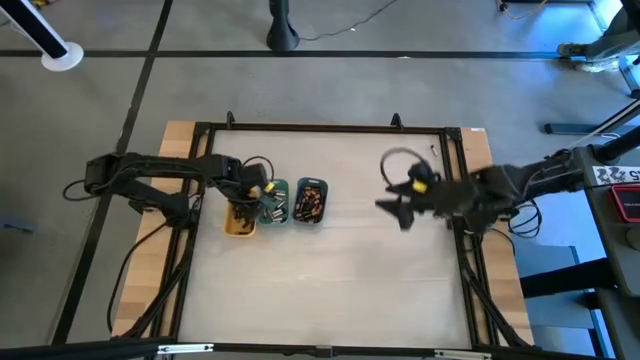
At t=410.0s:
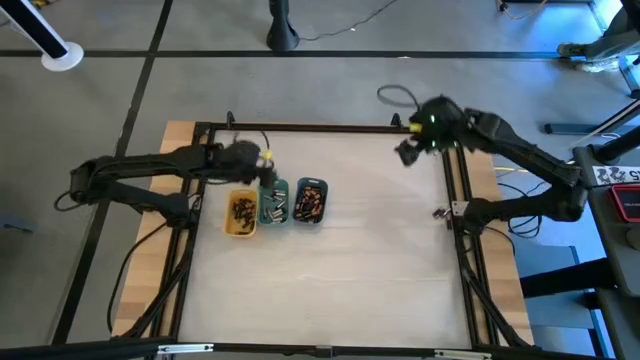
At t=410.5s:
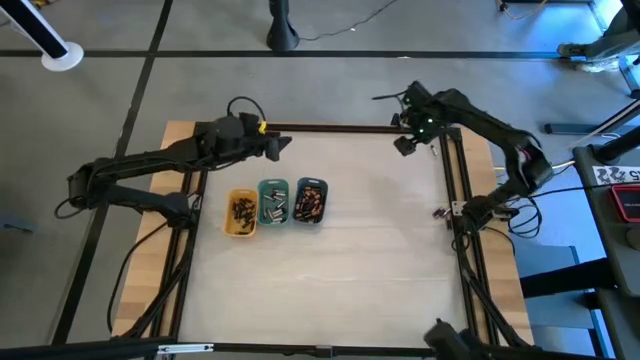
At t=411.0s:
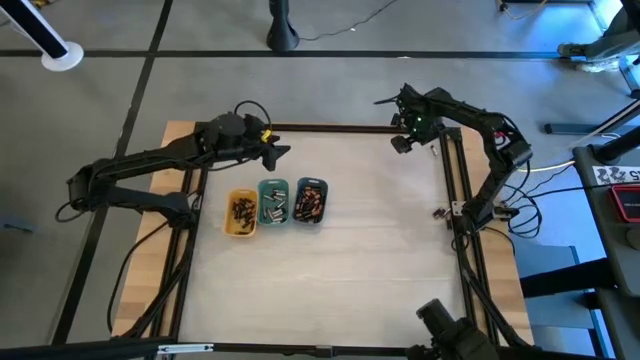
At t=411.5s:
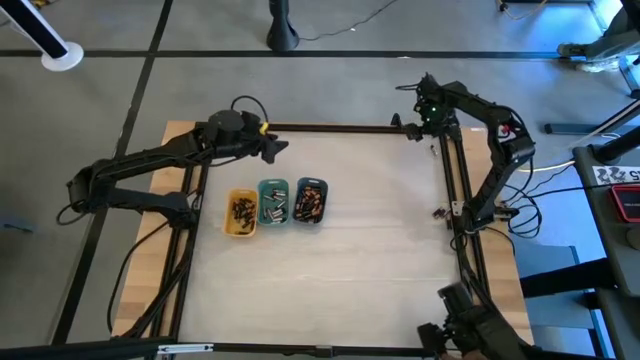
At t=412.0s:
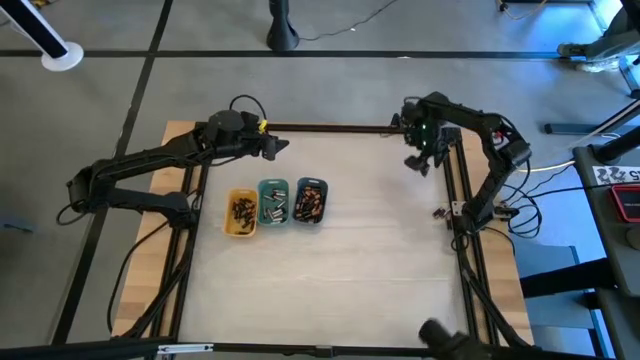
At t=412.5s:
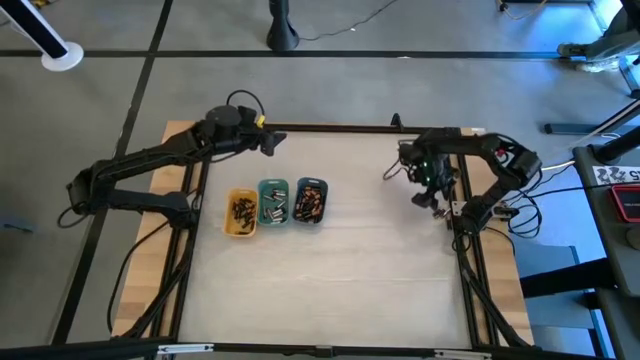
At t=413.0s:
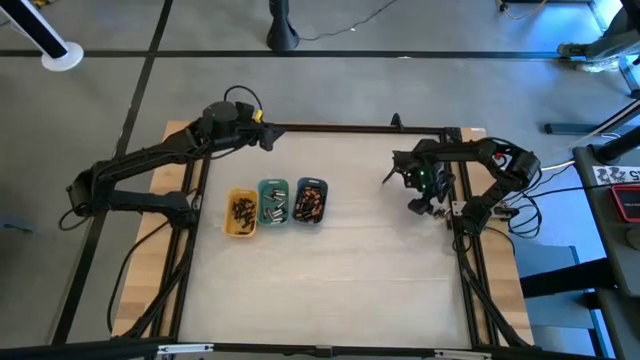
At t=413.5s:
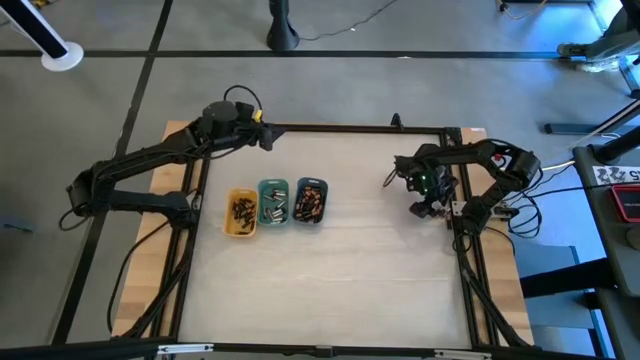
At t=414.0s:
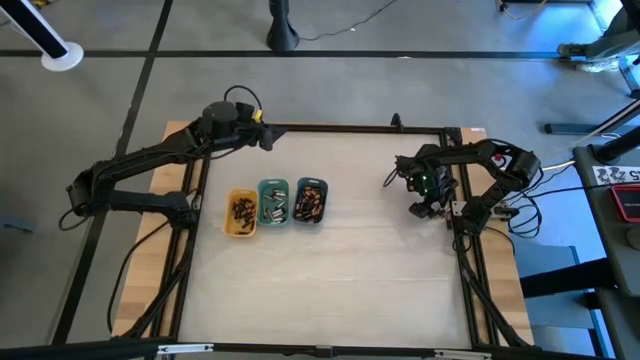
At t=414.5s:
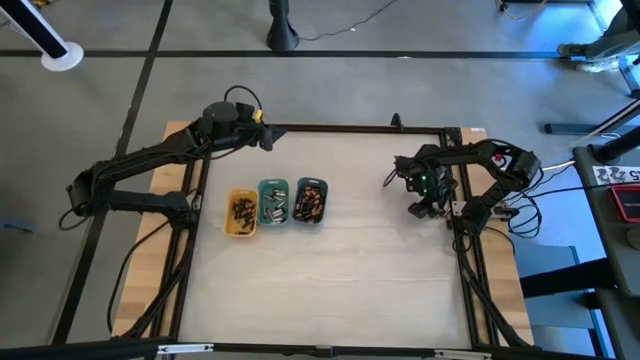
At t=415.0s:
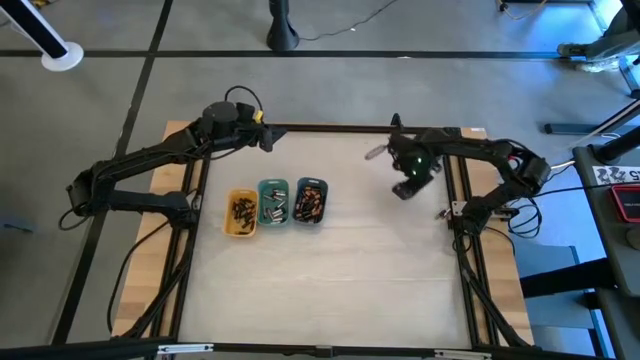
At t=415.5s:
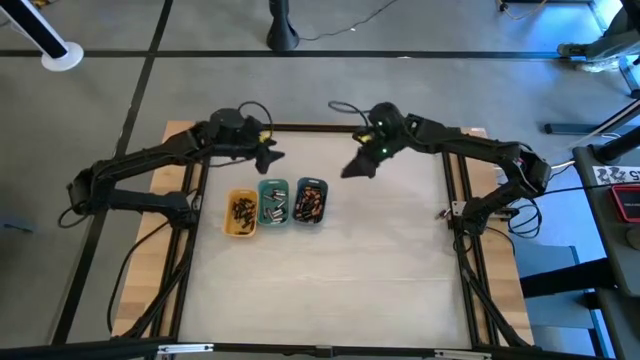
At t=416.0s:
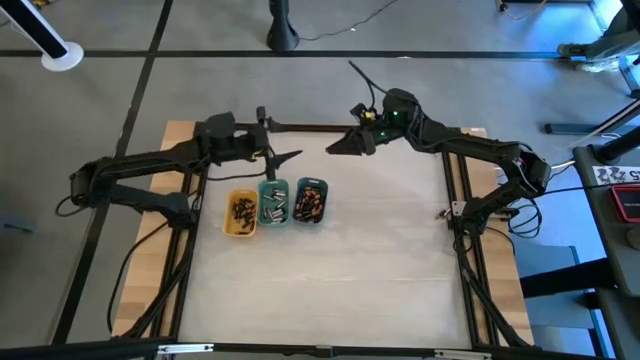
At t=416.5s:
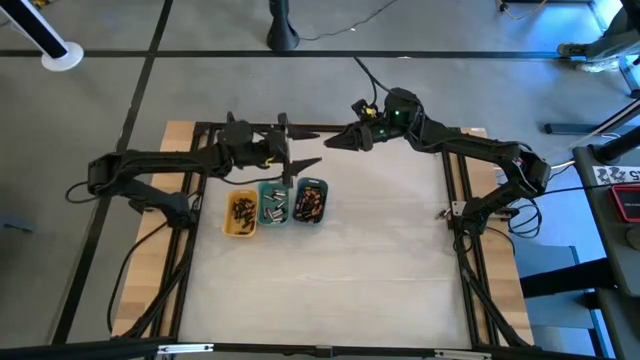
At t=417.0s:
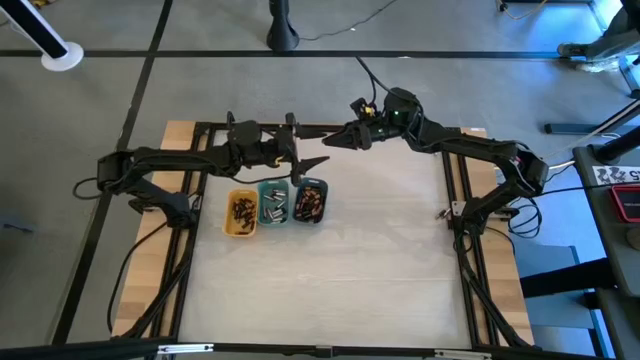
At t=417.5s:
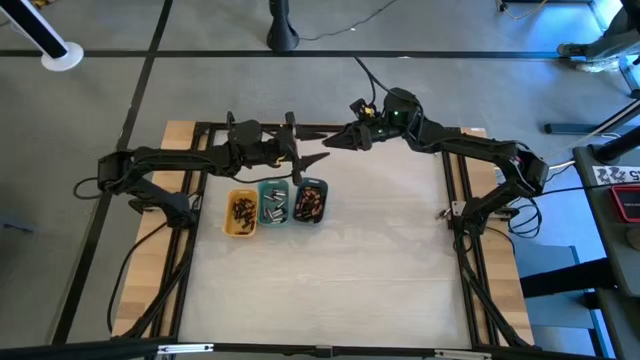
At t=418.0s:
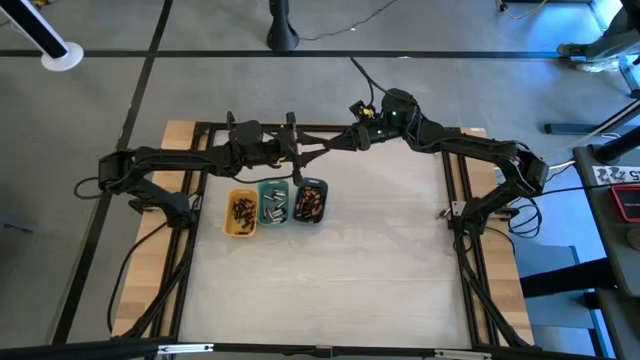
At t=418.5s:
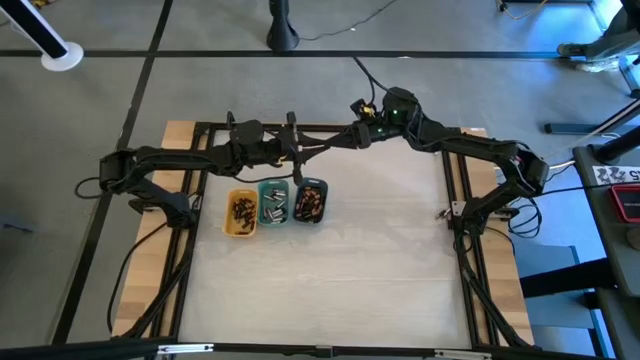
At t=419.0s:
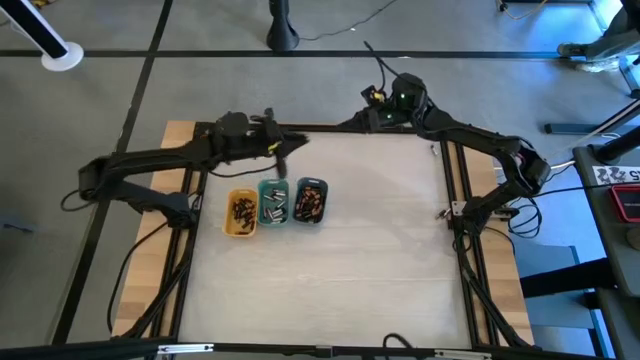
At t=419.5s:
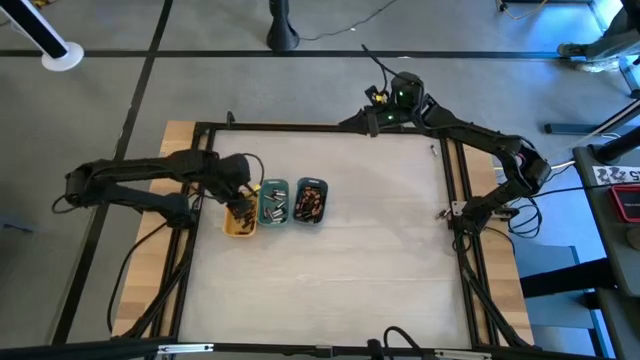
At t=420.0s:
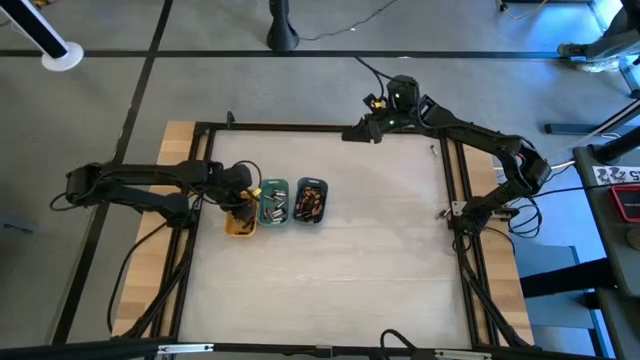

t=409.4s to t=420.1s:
Task: Sort batteries
Put the small black battery into the yellow bin

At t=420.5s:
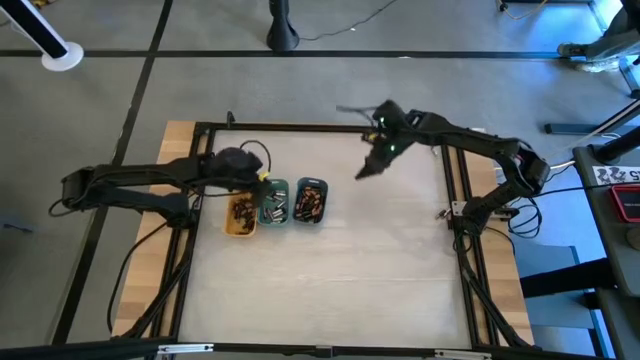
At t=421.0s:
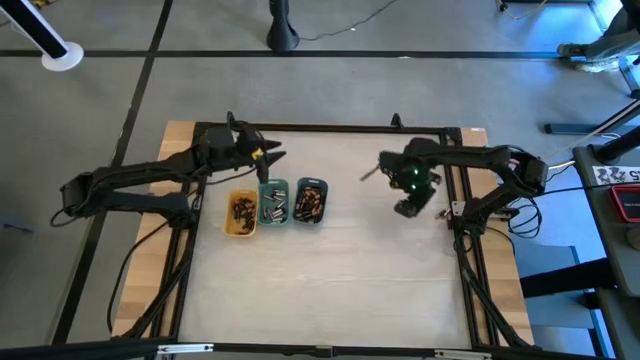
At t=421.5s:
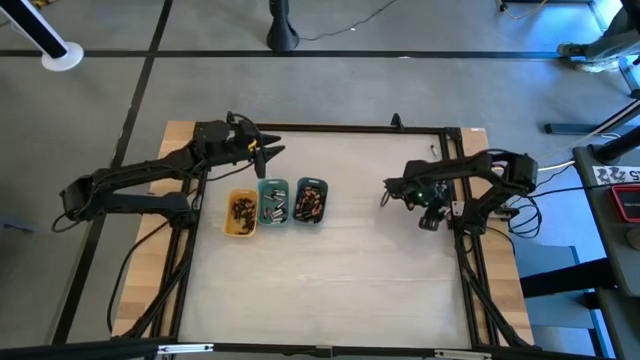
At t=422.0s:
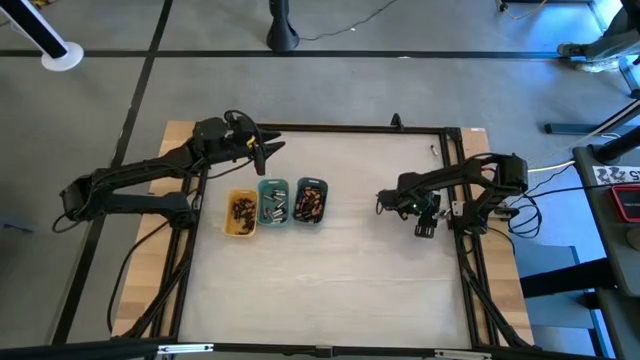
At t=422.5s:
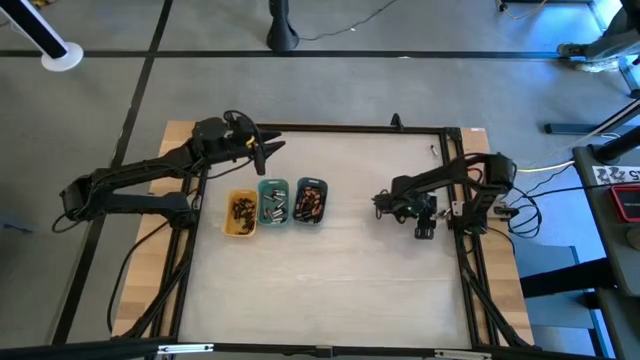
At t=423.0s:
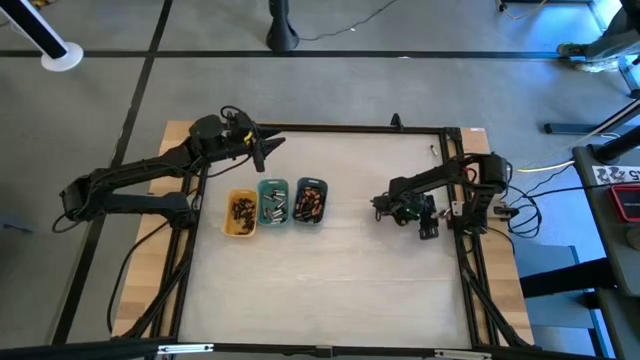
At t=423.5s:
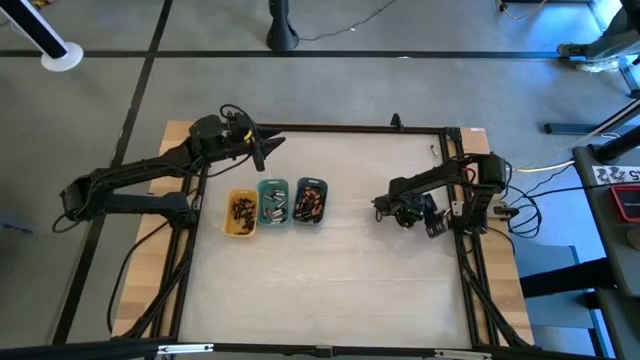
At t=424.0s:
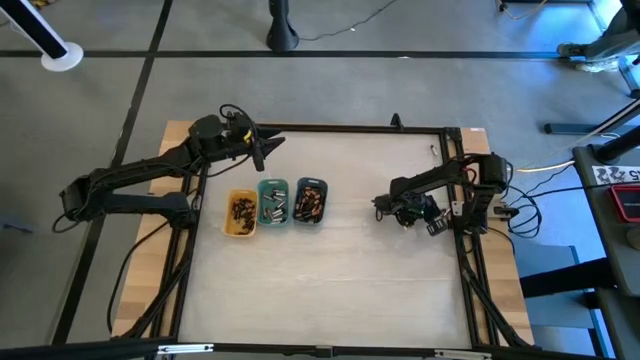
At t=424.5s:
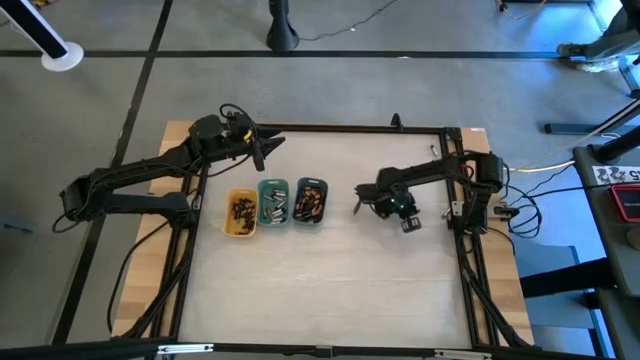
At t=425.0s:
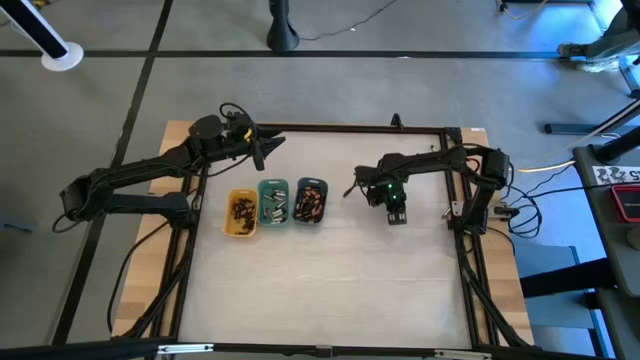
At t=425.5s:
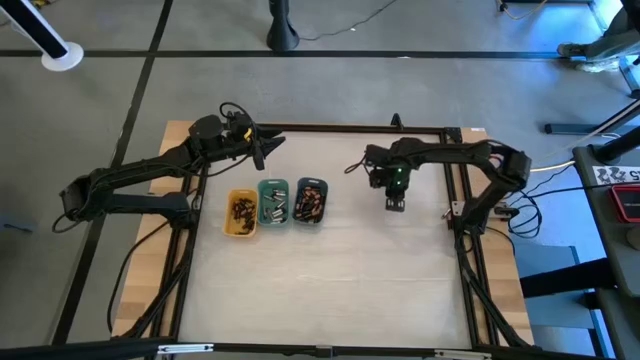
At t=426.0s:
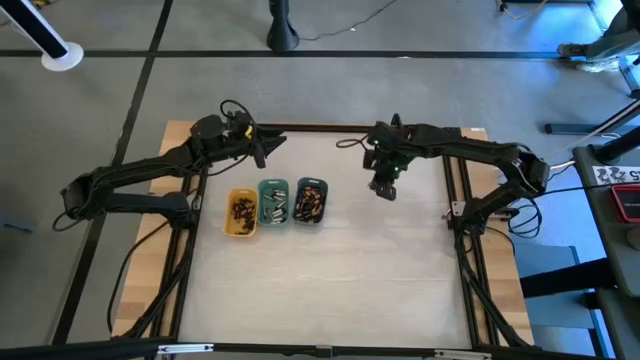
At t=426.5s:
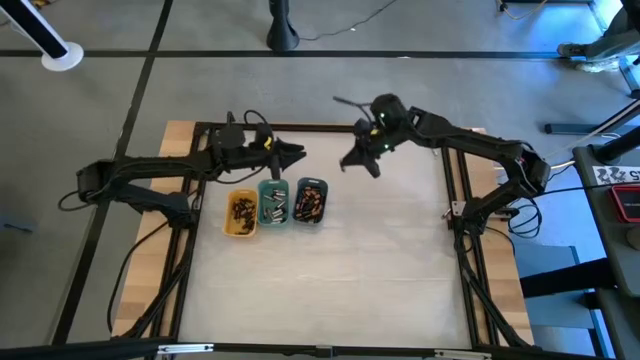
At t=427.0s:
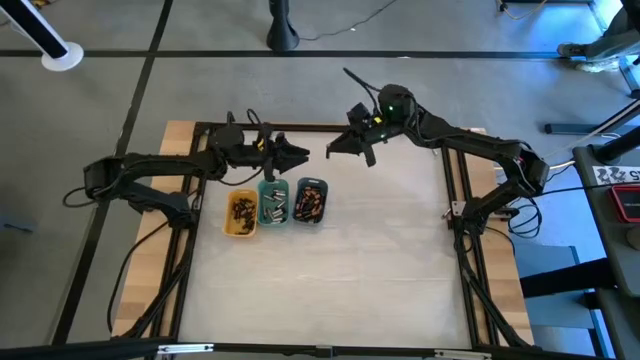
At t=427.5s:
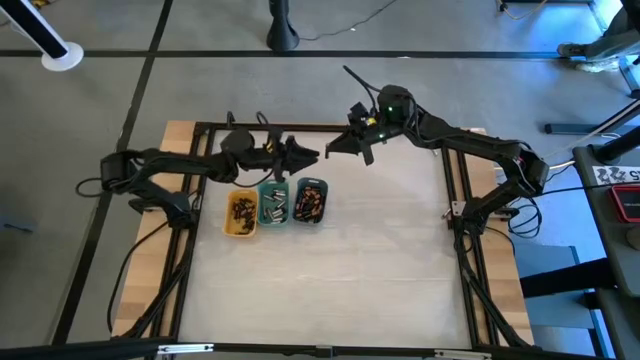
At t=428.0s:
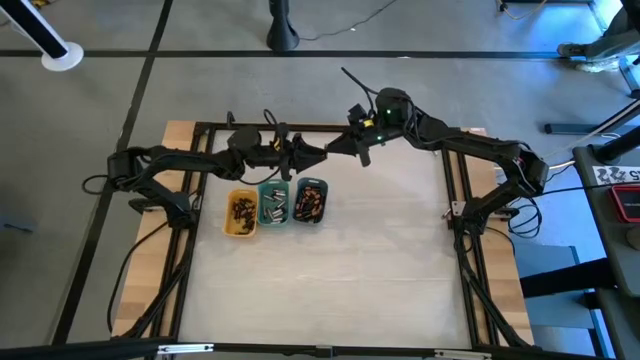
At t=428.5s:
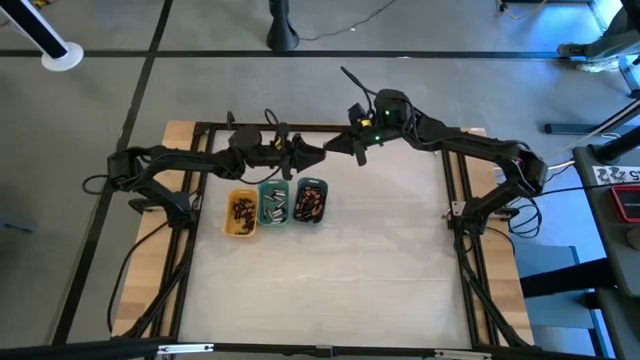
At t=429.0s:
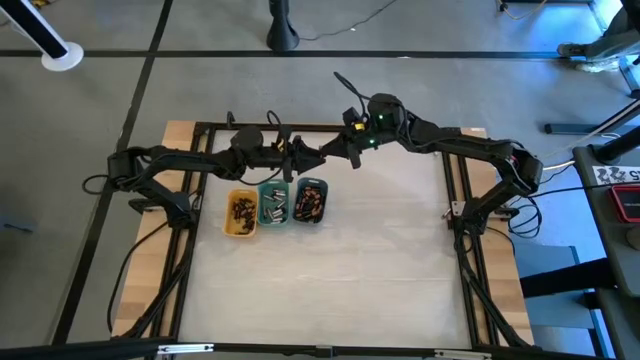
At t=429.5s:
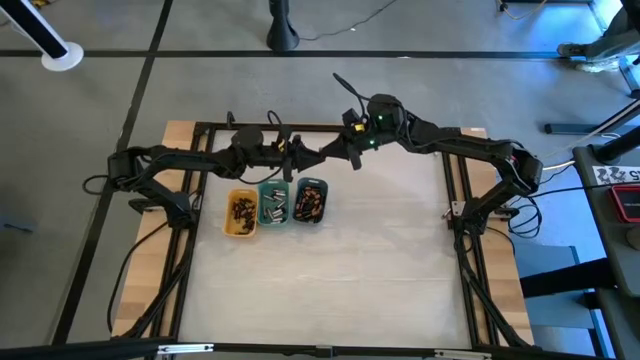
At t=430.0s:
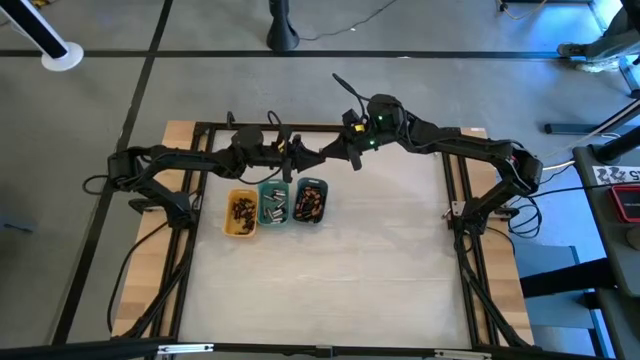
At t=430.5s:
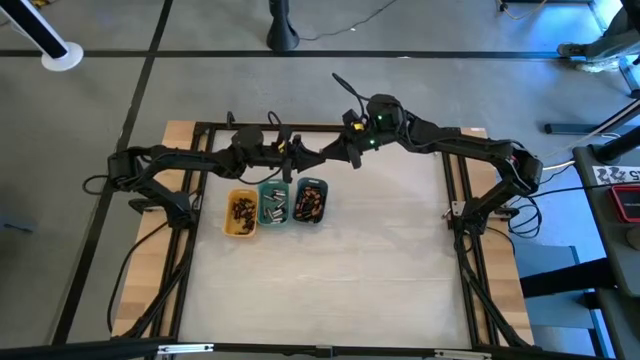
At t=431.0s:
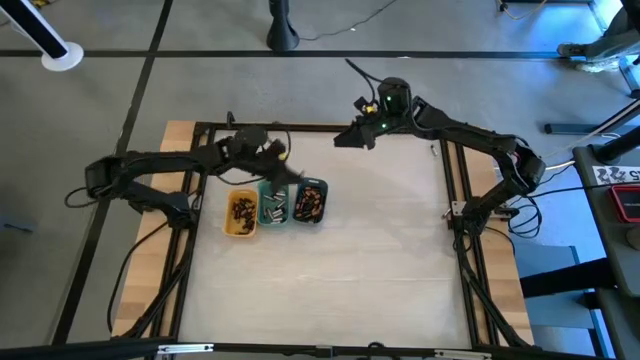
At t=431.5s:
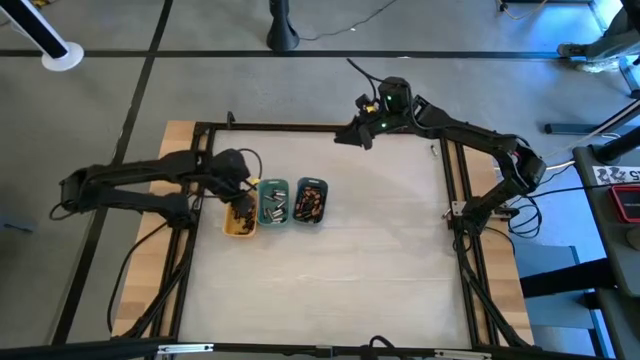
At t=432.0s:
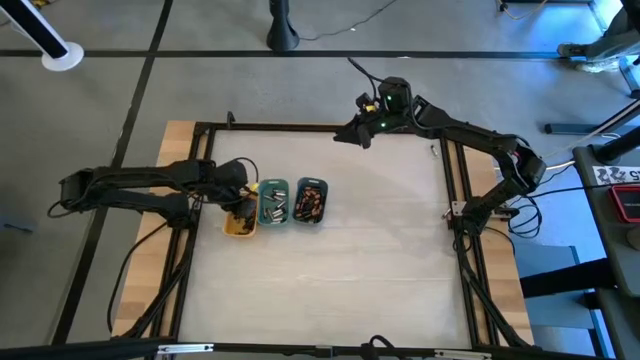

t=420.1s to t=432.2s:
Put the small black battery into the yellow bin
